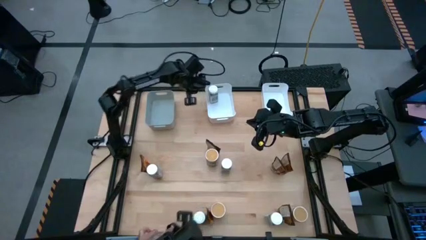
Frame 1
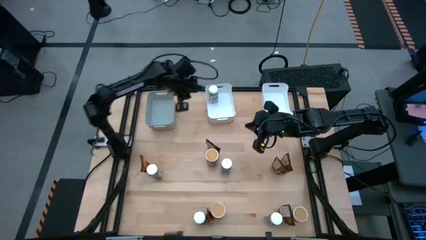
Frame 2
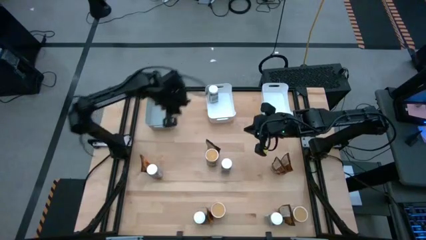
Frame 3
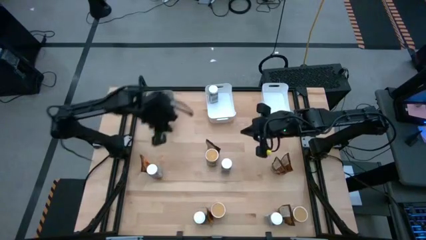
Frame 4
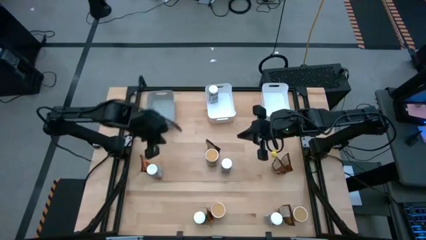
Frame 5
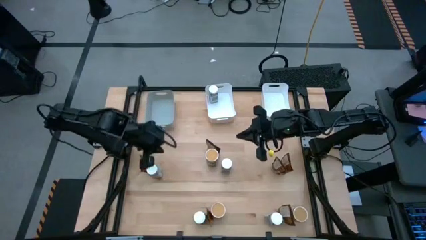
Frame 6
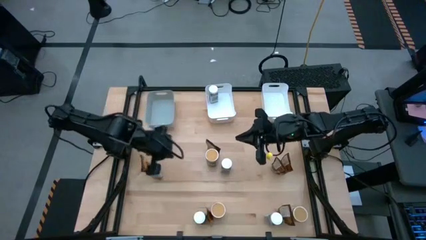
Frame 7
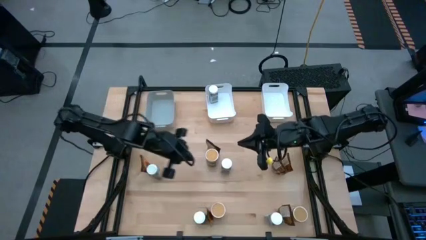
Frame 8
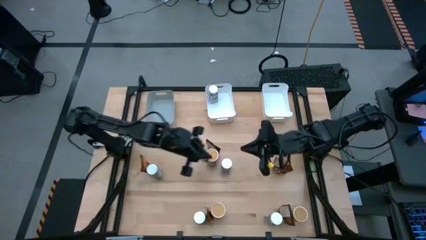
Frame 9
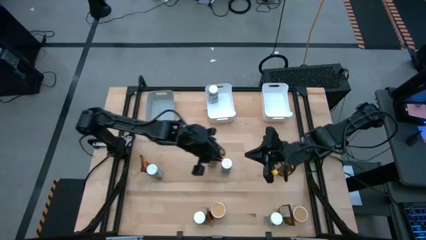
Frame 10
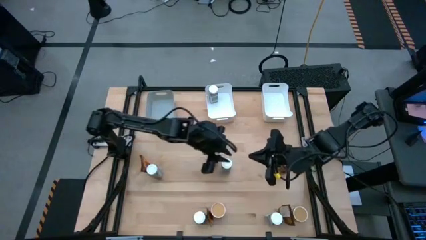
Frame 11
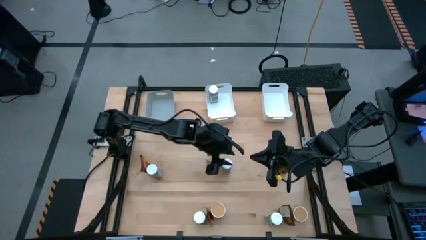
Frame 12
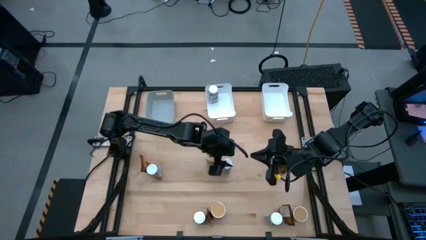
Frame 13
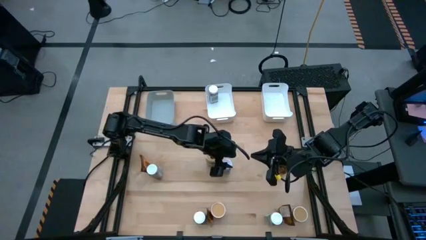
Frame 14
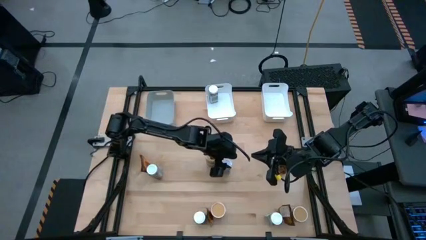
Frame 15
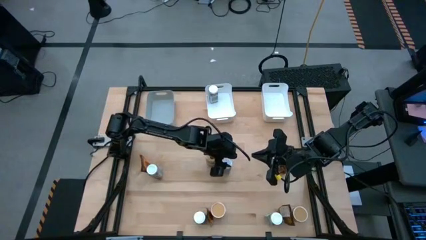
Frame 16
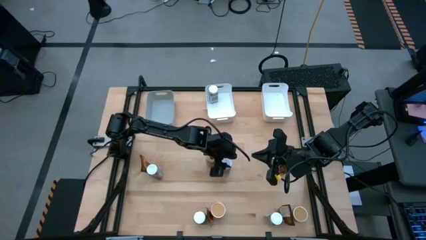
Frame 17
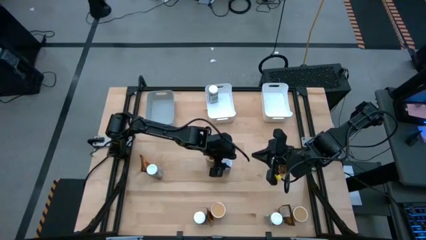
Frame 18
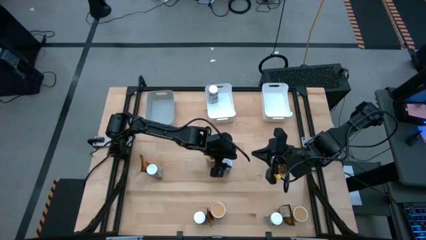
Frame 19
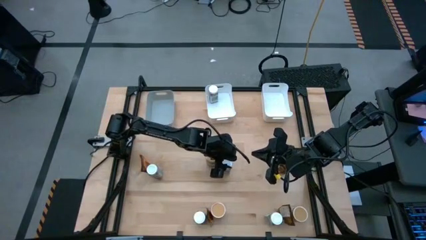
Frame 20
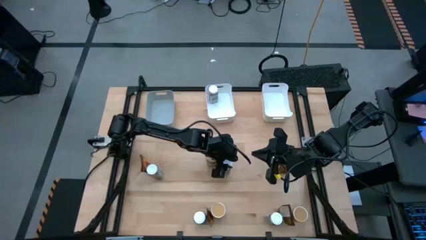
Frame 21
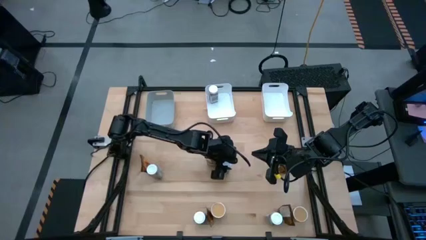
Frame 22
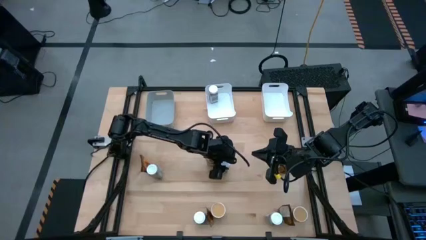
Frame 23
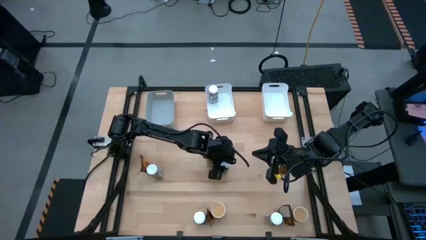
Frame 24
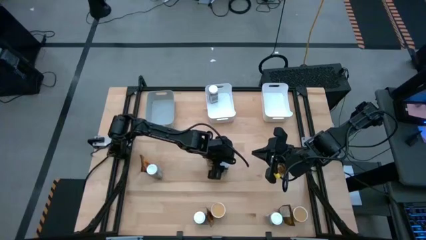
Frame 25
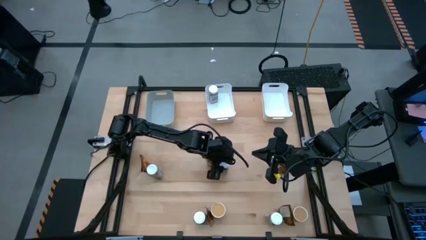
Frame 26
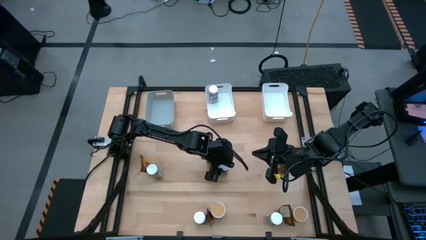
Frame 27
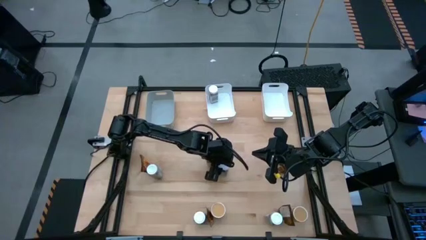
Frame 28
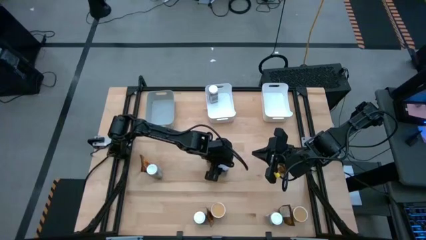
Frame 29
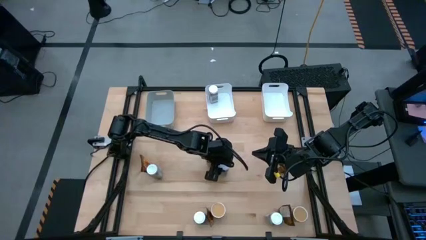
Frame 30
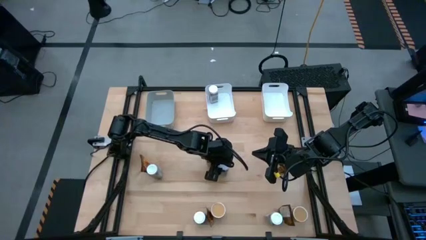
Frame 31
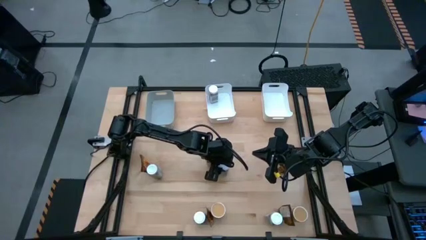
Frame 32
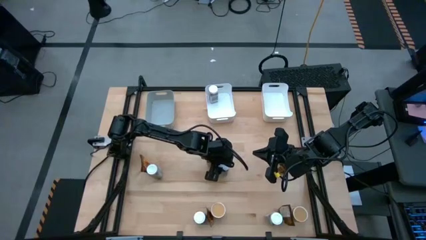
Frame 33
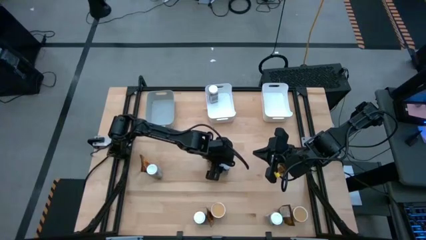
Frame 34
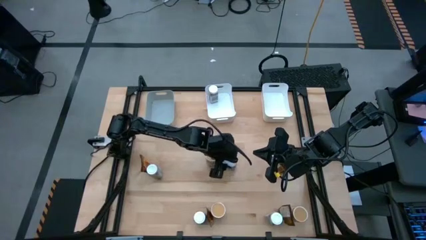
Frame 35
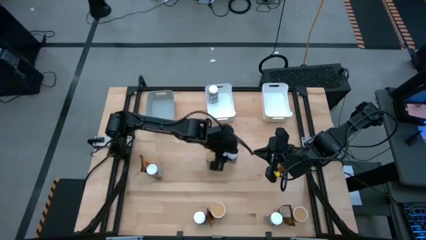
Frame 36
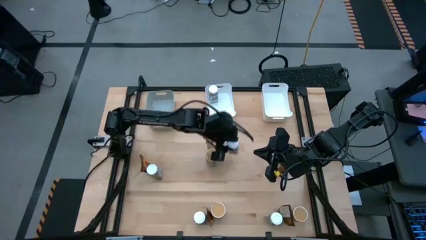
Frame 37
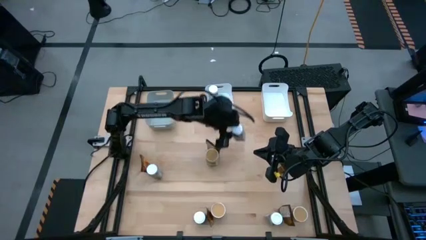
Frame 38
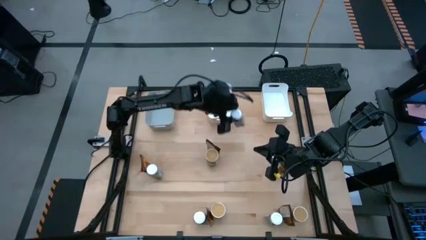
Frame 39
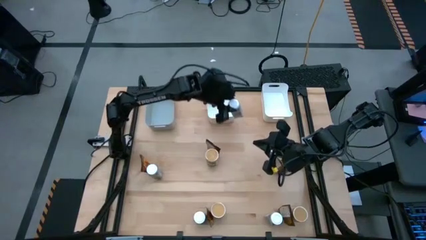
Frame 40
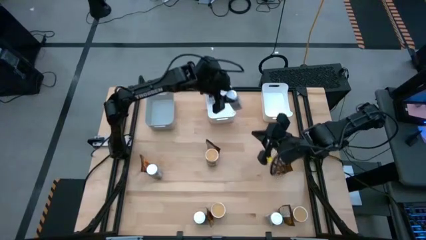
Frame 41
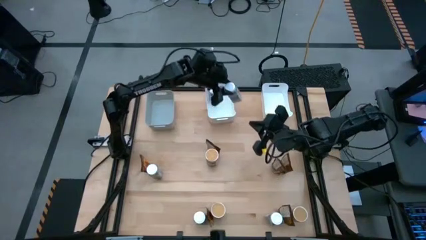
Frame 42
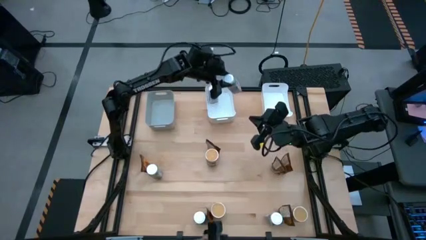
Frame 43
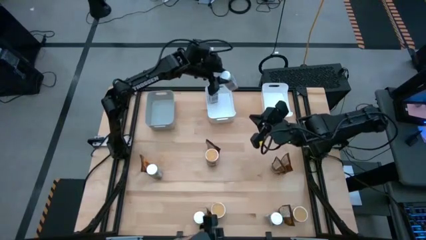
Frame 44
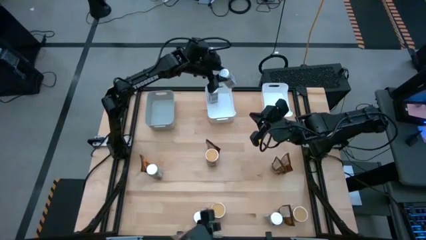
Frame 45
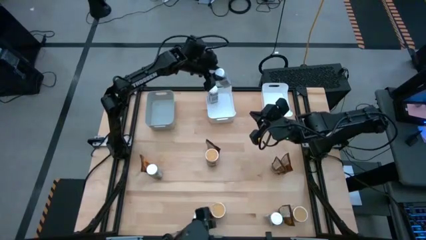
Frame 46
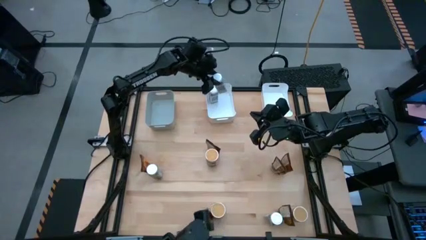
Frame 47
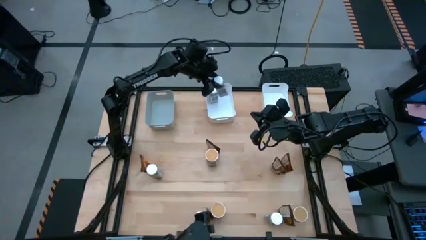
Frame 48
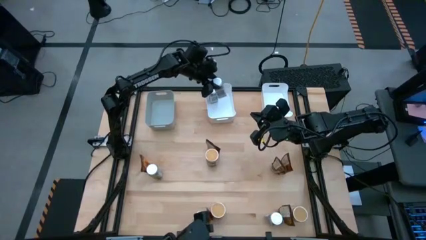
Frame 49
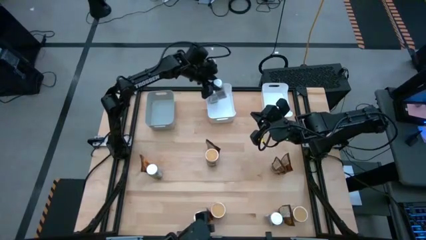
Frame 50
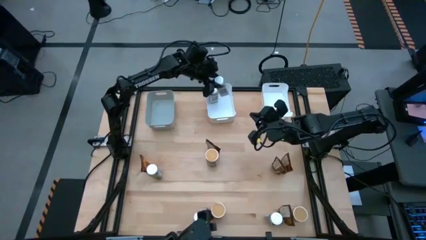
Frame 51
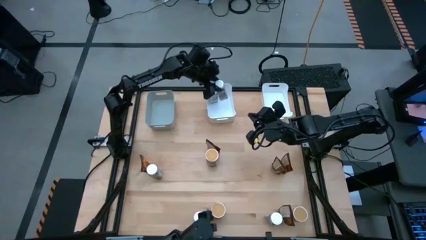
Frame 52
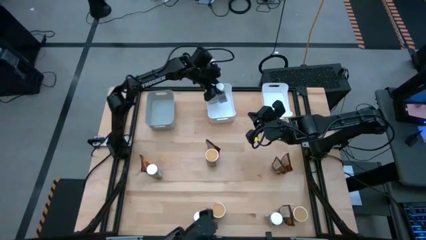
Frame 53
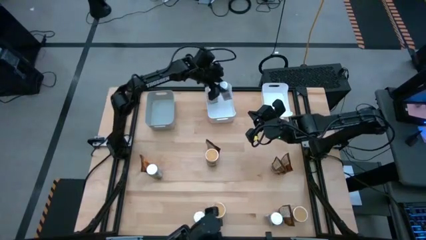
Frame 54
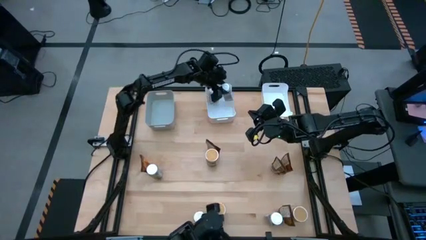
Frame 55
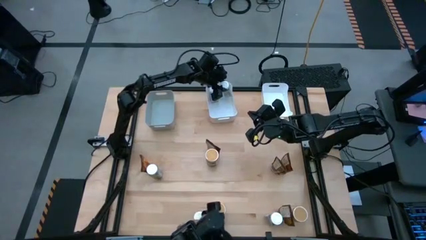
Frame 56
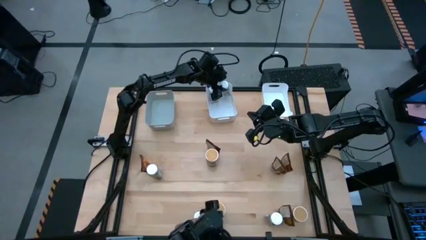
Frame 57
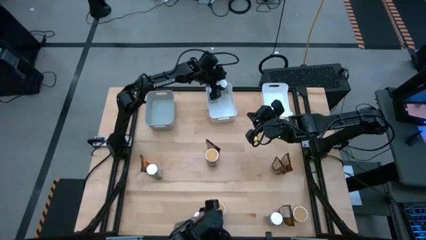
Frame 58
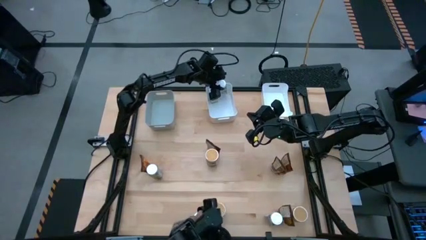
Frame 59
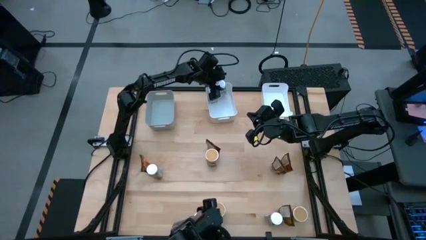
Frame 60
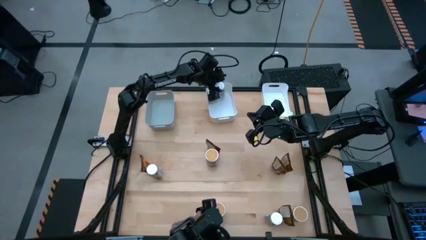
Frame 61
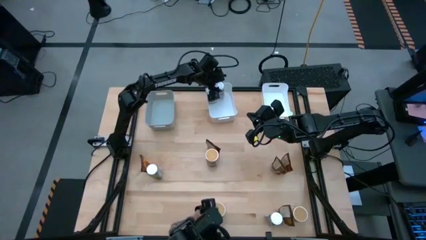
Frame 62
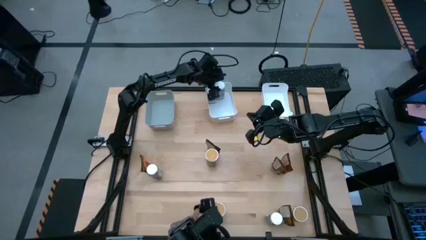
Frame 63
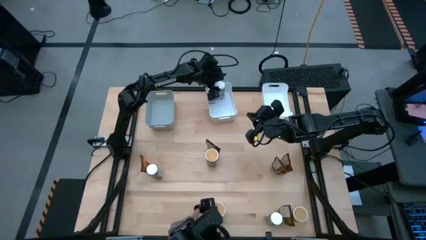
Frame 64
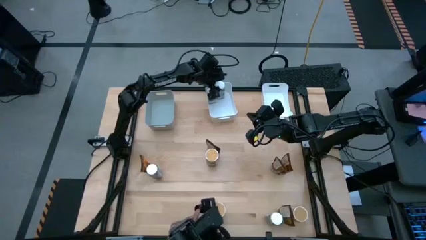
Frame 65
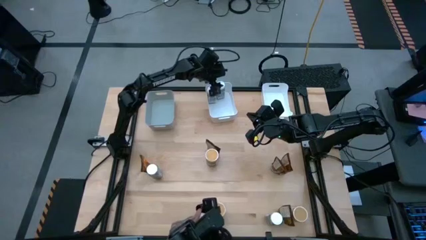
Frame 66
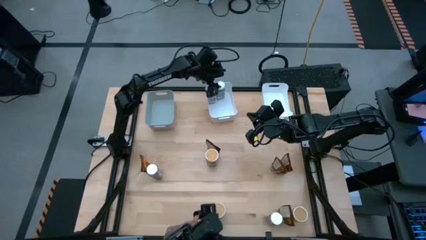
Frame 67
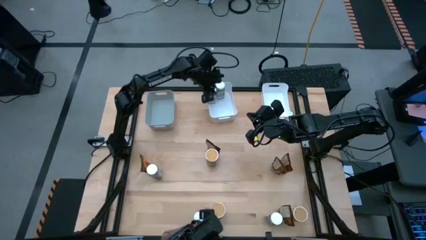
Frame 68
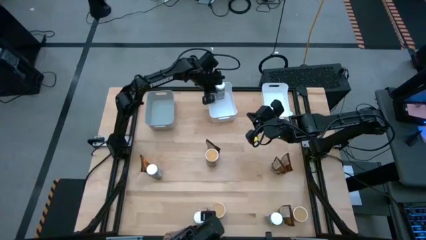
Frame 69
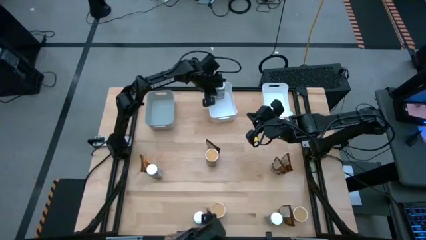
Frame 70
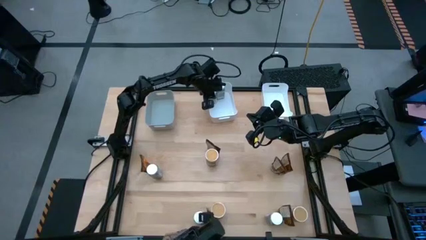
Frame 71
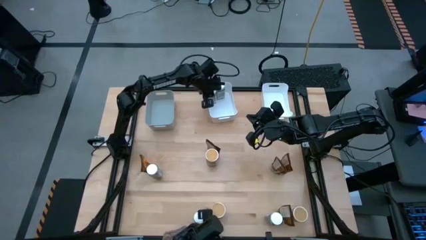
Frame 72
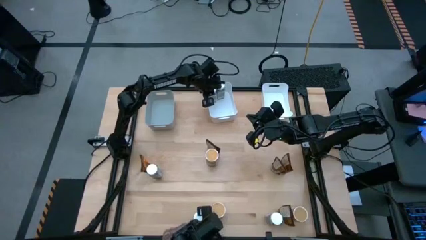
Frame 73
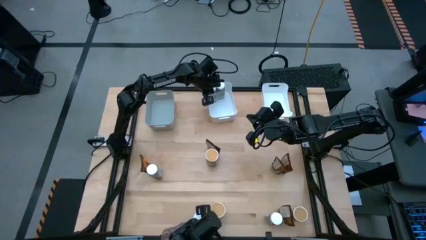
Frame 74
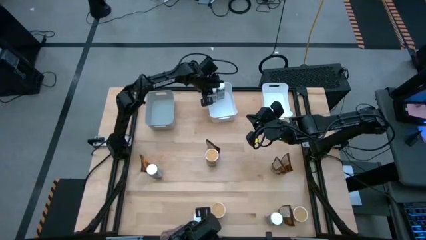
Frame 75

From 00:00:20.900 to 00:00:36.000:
Task: Sort spices by type
Put the white seasoning bottle into the left white bin

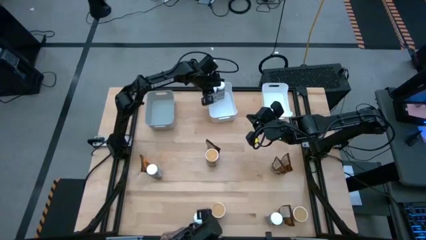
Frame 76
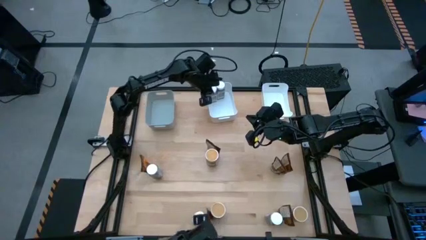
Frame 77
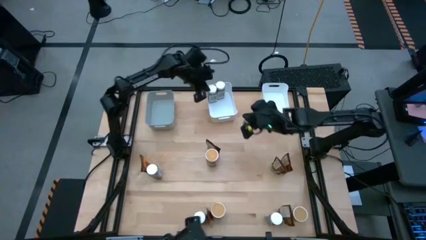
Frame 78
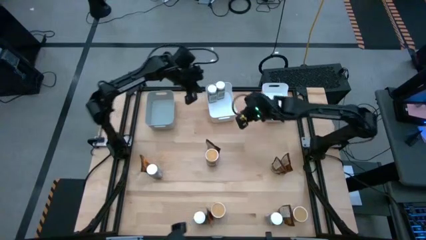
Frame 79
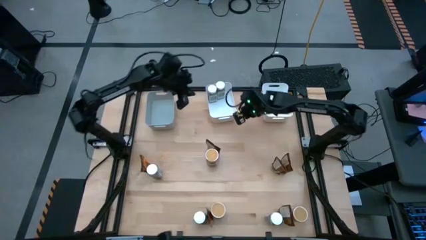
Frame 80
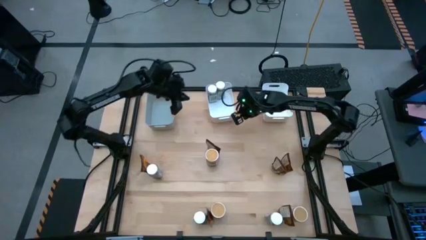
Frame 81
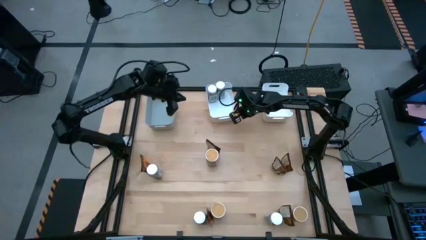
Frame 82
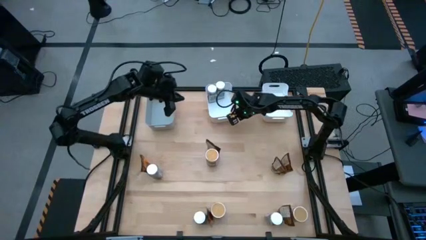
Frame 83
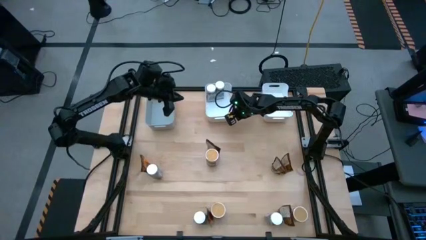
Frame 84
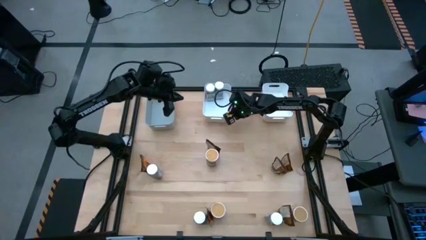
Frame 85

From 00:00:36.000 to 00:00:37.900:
Adjust the left white bin
